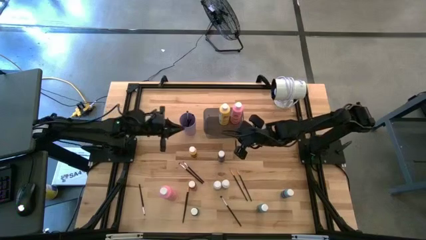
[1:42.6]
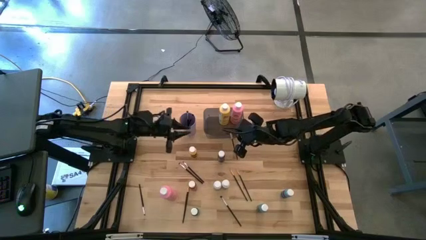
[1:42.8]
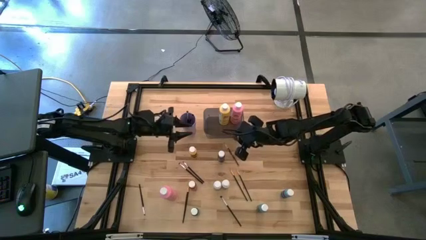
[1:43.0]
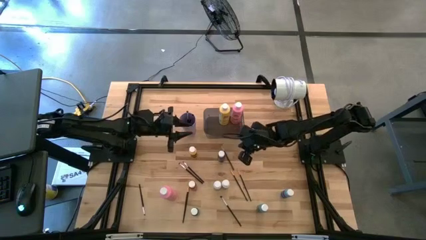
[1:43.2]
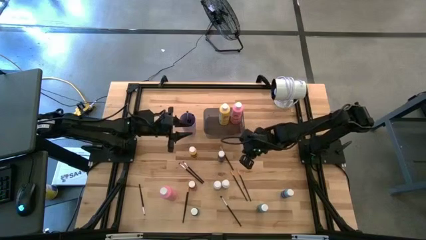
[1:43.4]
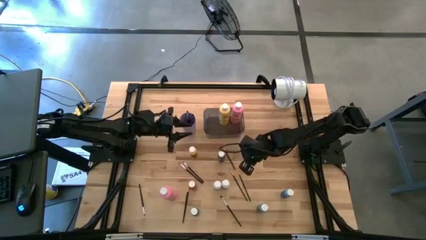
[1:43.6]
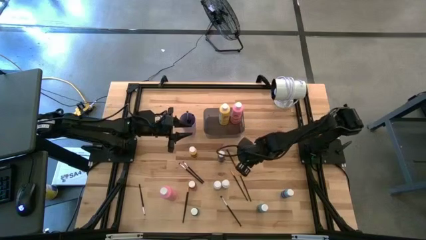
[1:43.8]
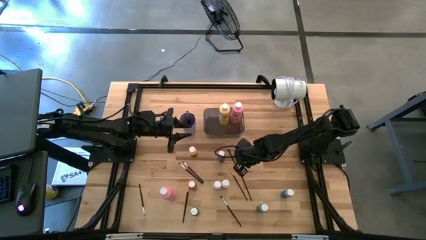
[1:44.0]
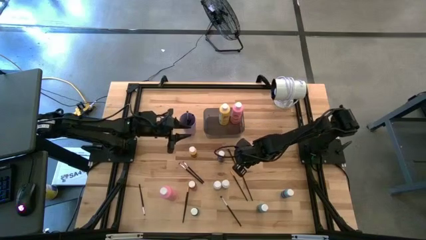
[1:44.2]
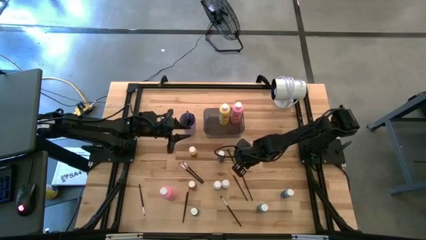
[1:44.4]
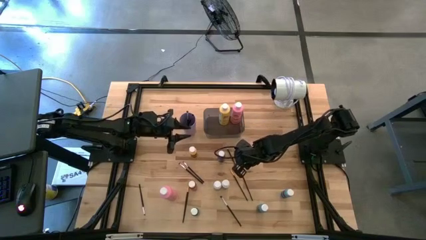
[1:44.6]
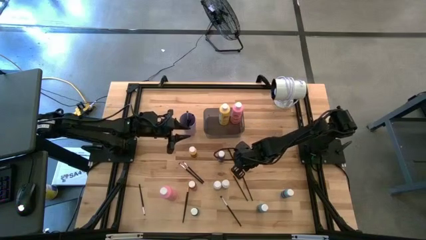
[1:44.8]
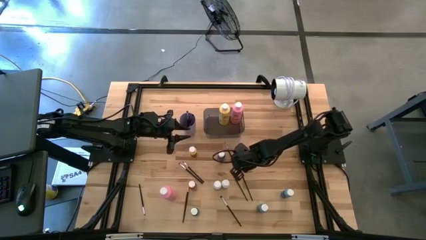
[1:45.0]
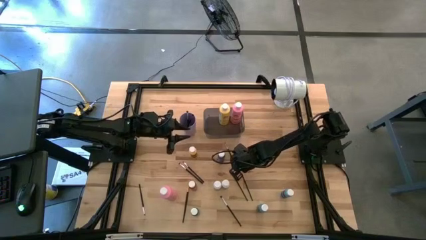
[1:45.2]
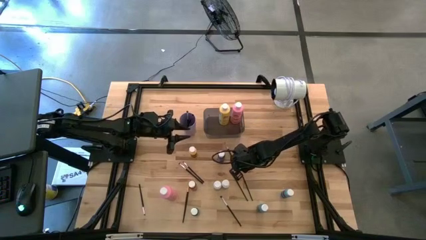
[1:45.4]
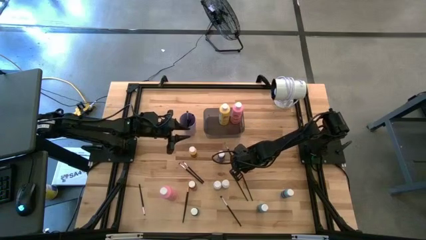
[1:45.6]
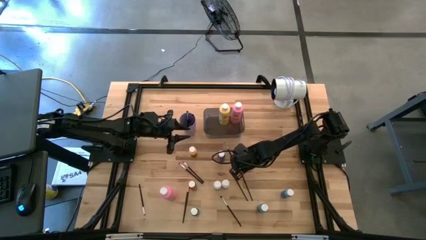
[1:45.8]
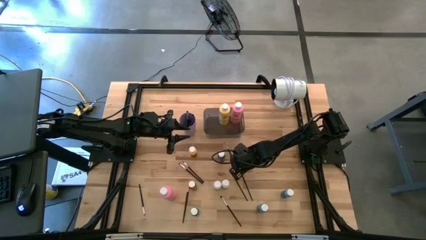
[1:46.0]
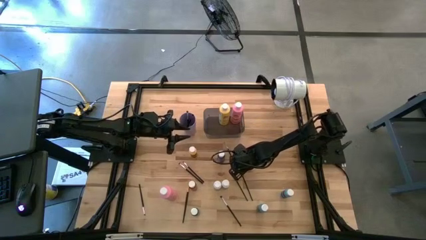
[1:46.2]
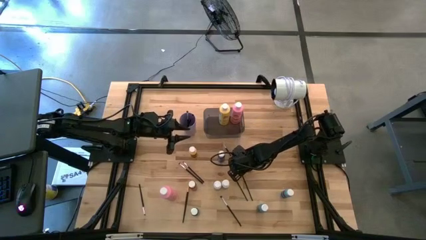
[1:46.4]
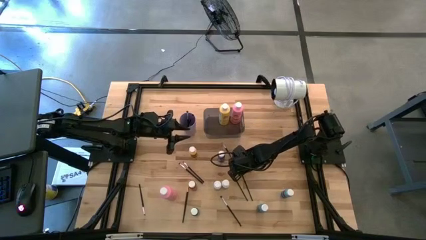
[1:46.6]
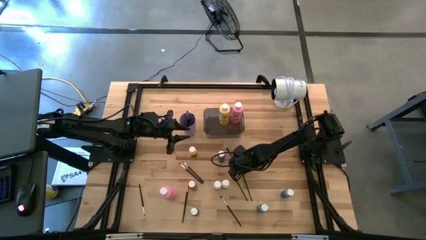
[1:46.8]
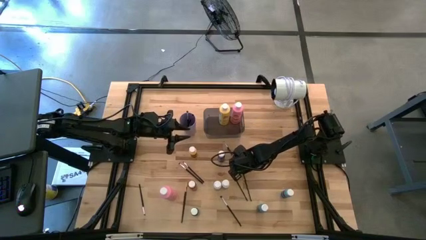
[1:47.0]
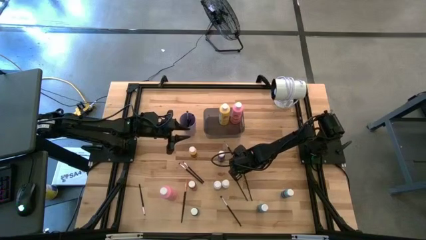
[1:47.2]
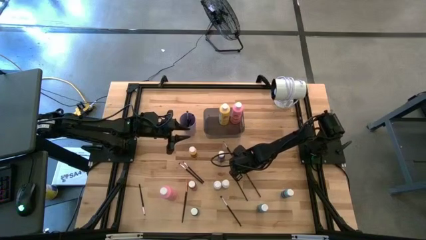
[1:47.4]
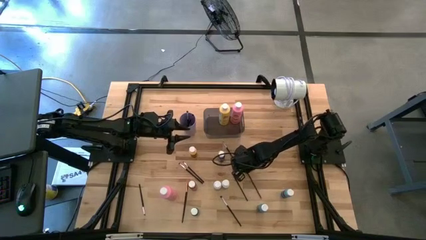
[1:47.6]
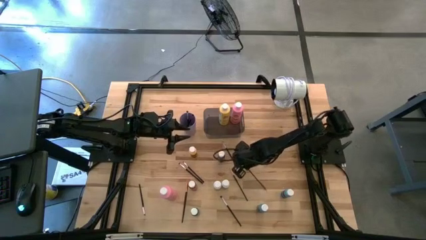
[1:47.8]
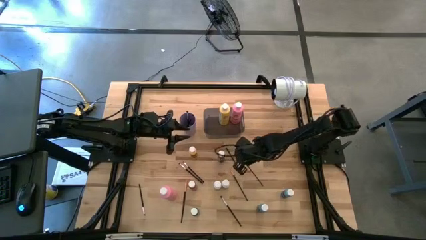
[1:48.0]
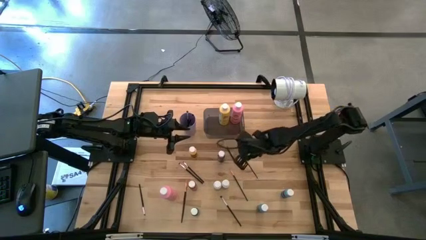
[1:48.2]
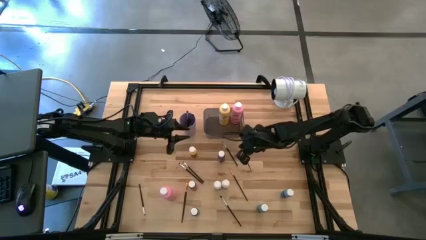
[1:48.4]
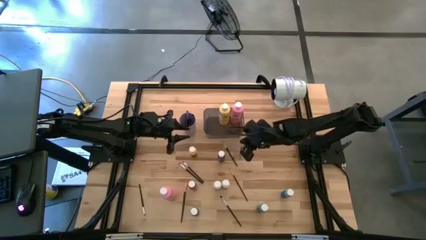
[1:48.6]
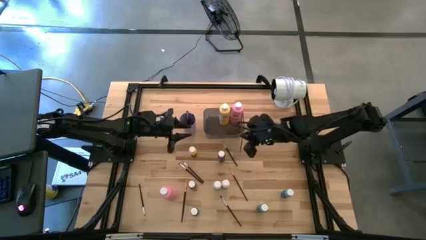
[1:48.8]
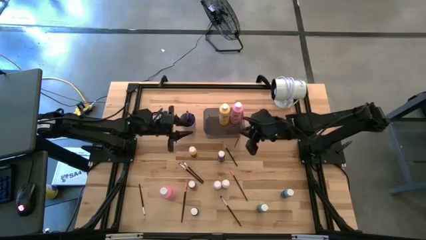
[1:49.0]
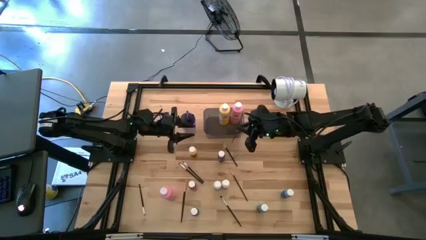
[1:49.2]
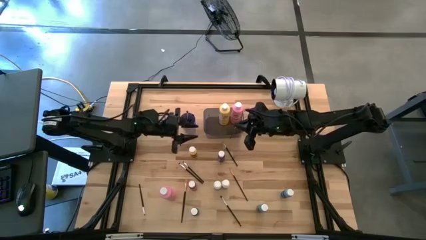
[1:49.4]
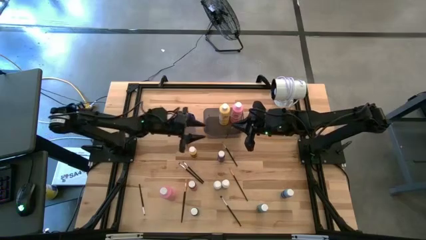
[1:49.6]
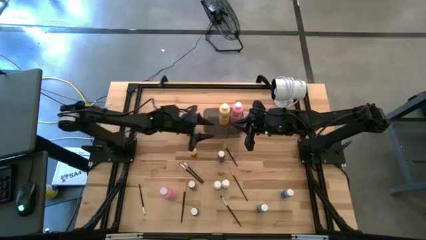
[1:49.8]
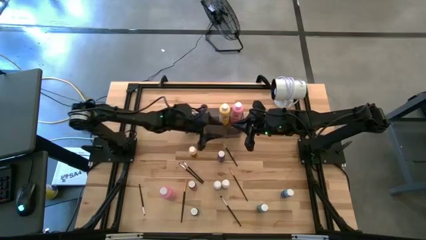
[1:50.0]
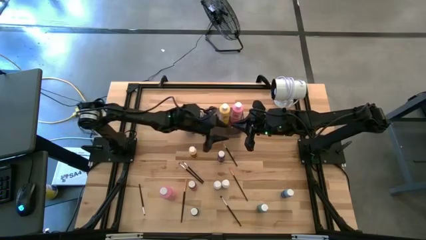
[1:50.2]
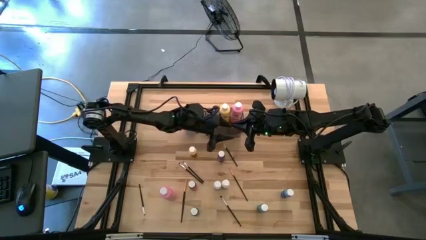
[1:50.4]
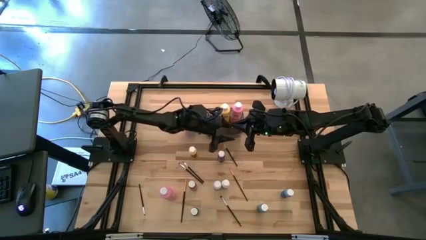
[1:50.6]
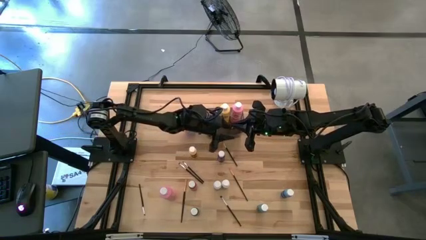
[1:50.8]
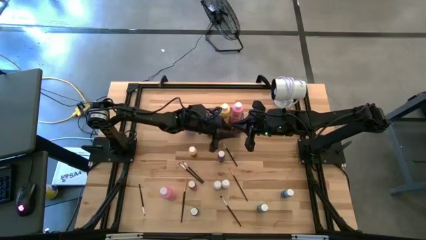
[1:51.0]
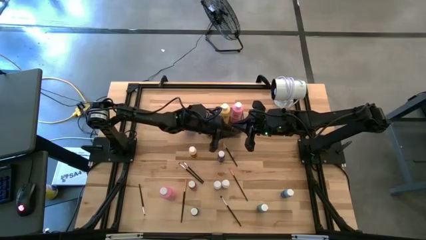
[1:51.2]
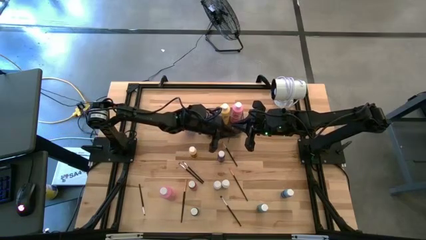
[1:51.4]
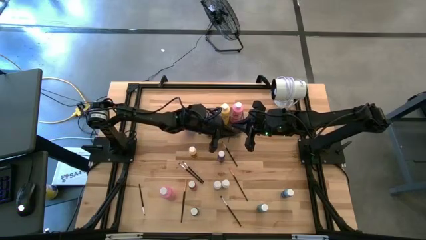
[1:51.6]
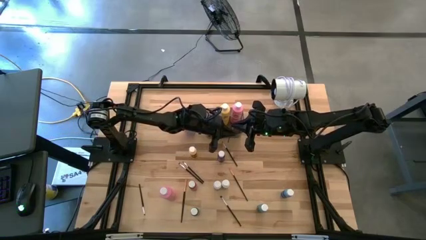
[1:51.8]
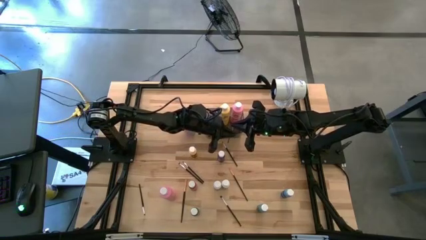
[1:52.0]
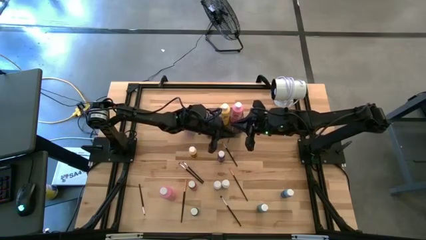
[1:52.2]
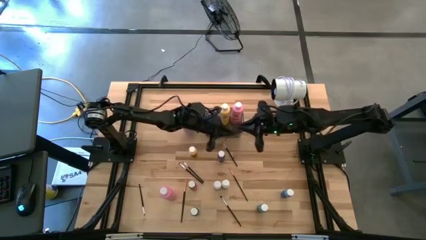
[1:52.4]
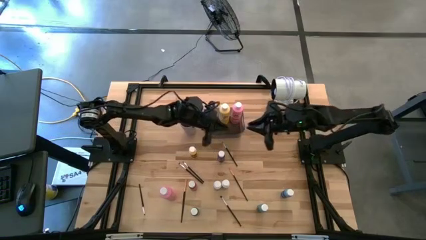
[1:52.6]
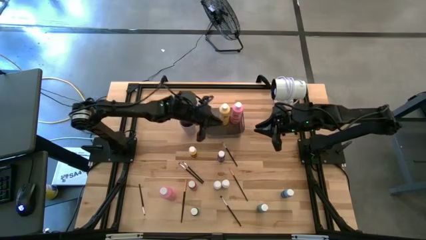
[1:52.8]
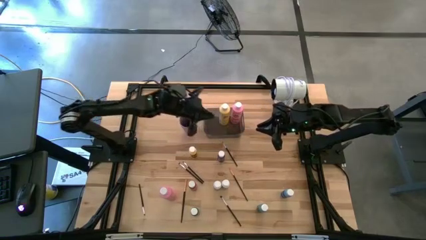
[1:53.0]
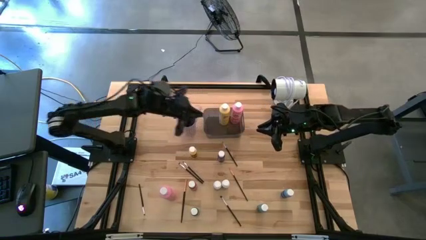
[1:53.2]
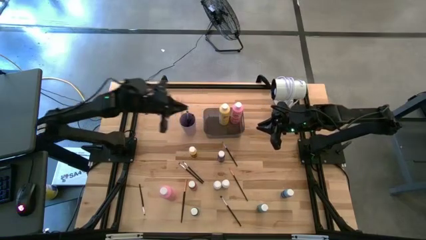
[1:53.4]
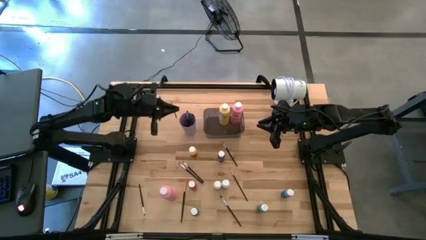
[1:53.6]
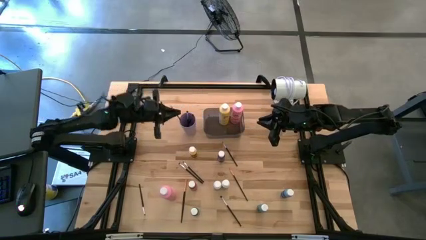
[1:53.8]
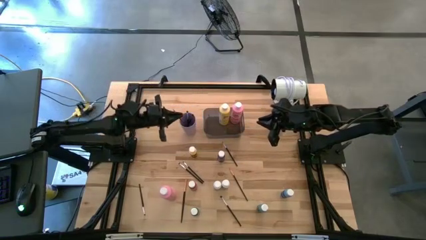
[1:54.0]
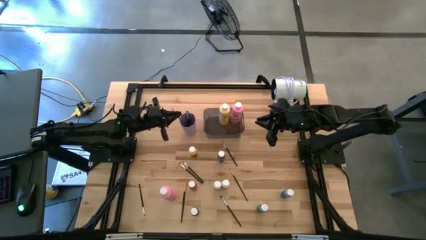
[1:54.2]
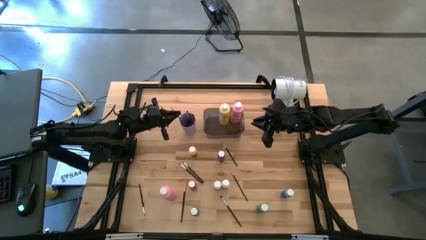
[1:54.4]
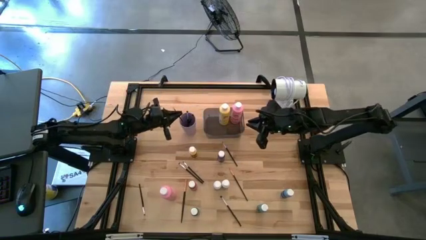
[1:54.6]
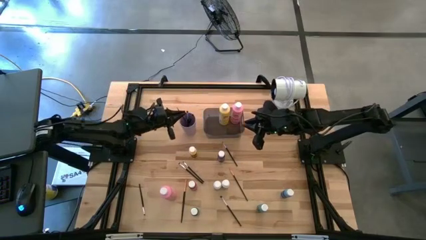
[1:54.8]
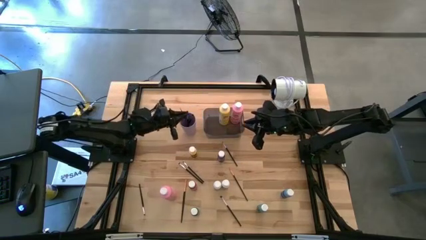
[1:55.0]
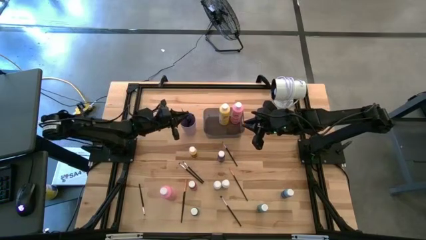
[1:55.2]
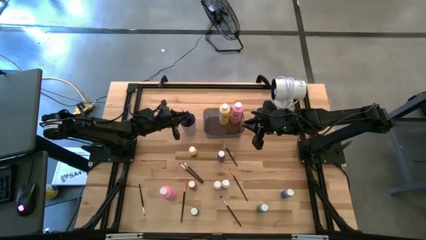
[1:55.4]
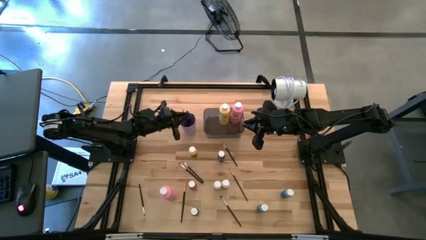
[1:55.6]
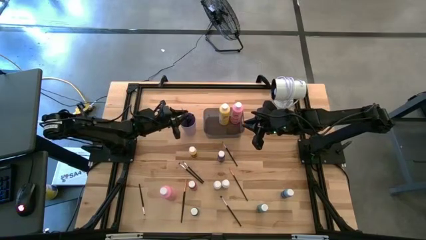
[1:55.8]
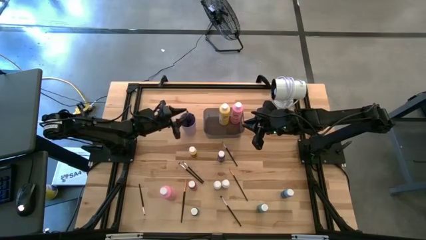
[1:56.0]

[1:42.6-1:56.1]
Task: Pick & Place Paint Supplies
Put the gold paint brush into the purple cup

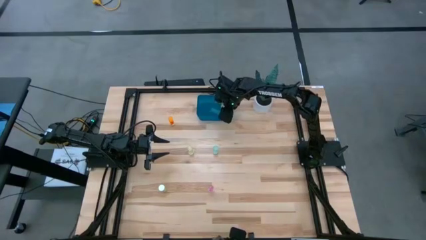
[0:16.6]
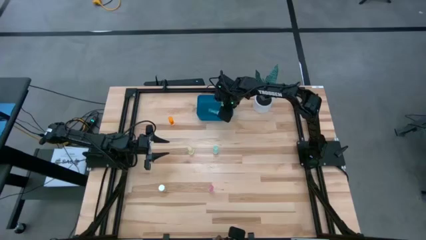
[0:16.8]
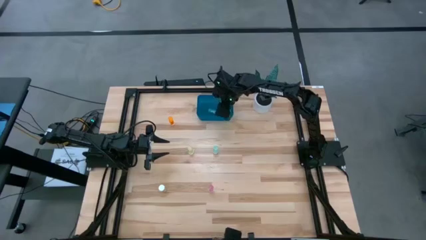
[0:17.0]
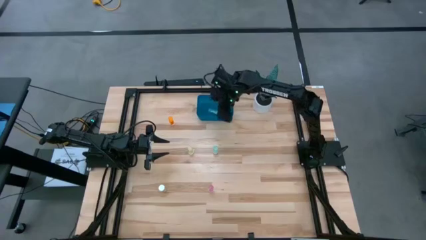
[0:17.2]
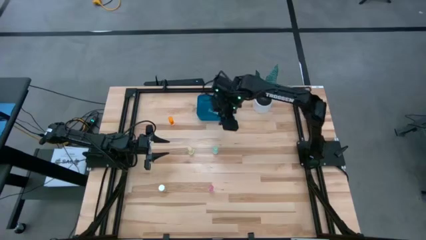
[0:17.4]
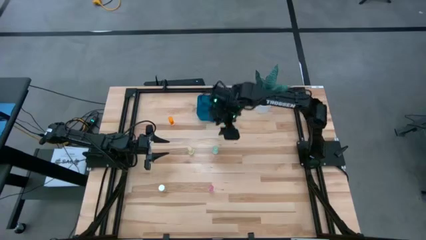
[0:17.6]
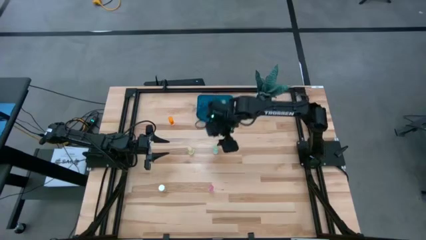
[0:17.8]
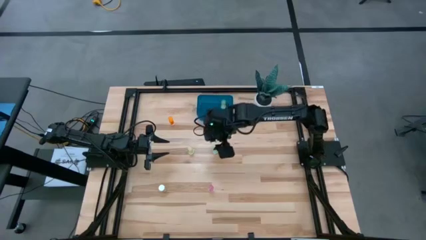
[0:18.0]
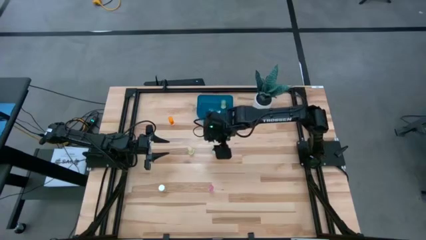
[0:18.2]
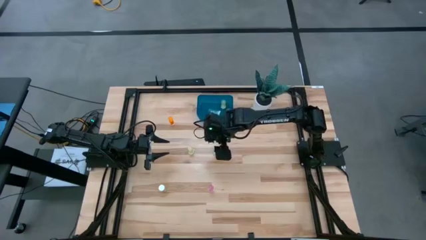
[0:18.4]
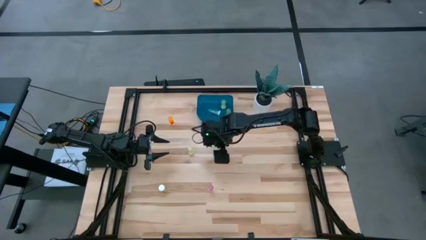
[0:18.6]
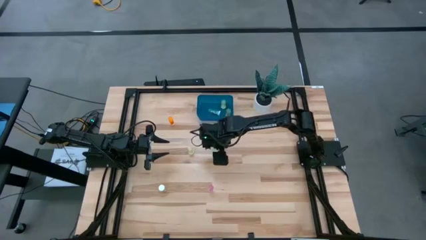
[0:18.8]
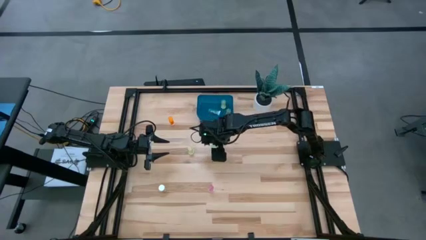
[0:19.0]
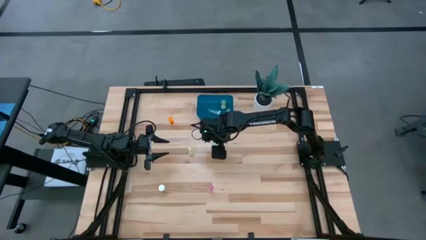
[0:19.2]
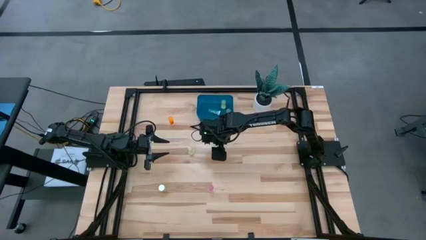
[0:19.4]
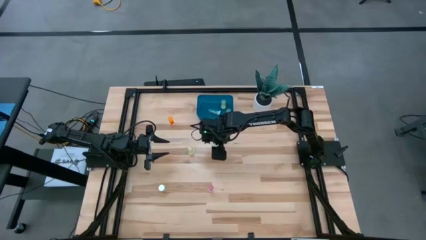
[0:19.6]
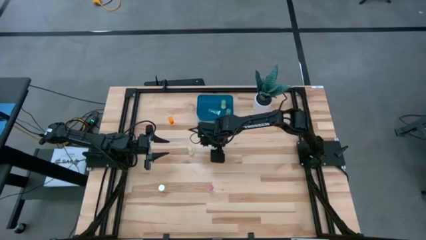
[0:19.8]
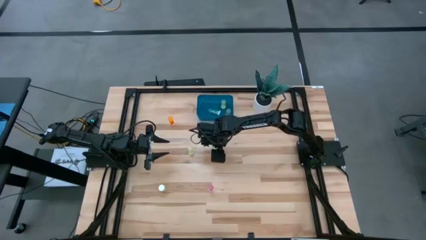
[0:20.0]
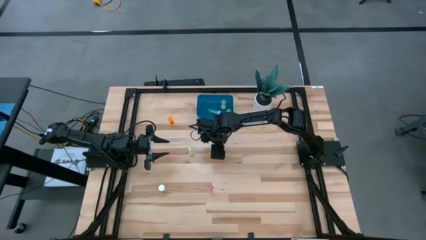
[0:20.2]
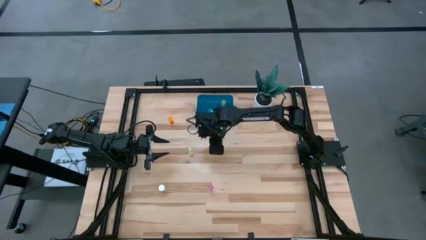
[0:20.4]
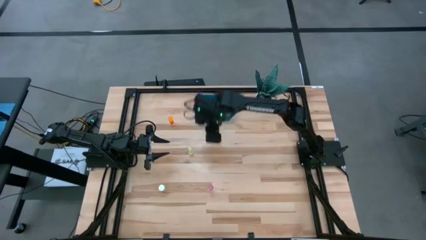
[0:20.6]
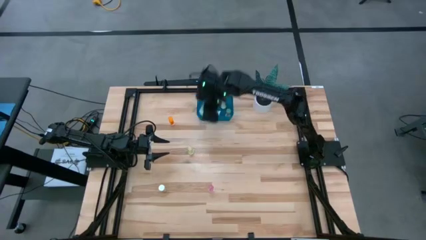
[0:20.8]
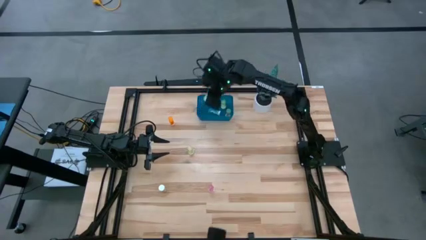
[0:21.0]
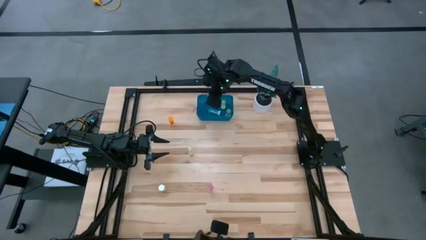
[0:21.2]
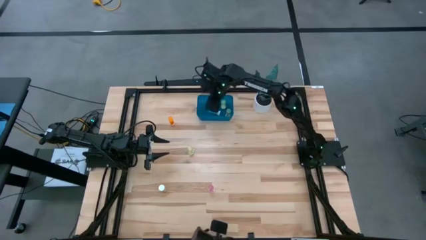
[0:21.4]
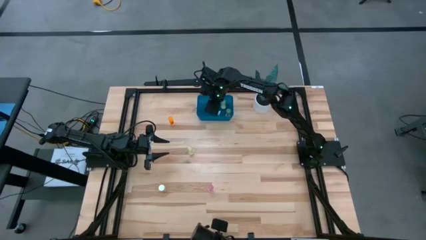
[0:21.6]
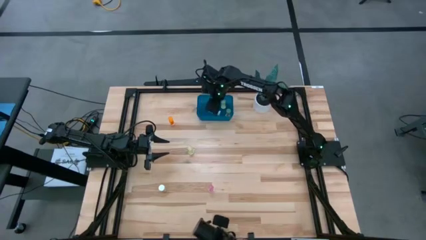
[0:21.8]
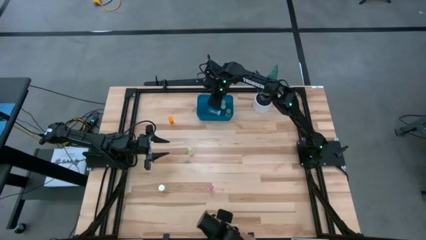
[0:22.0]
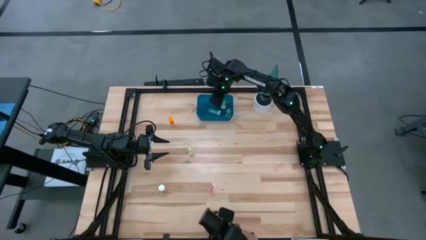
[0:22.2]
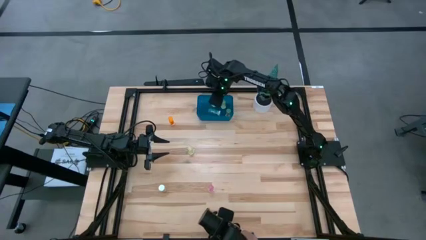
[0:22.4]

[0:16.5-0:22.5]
Task: Pick and place pill bottles into a basket
Put the blue pill bottle into the blue bin
